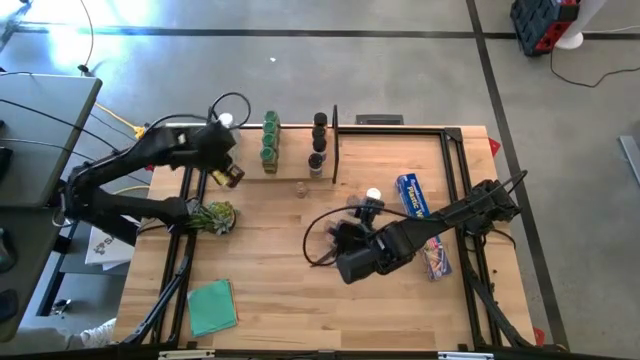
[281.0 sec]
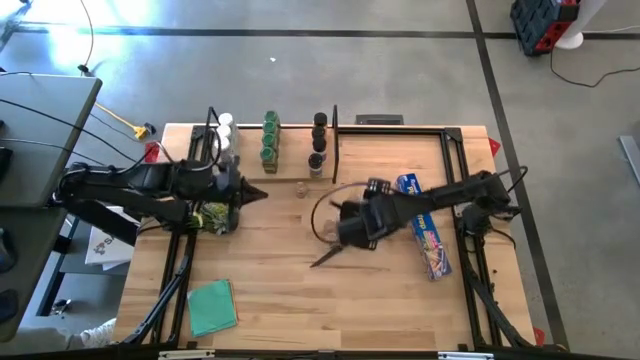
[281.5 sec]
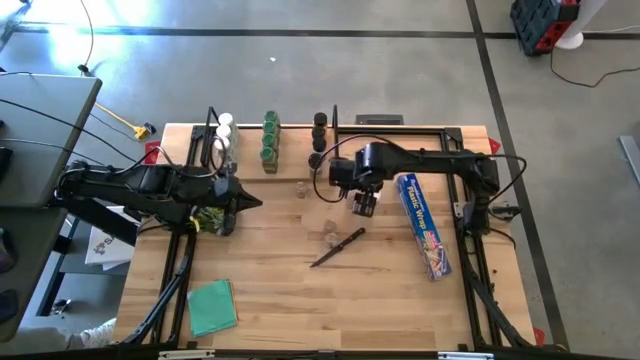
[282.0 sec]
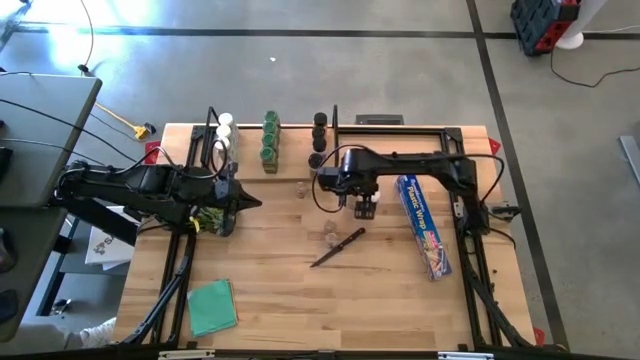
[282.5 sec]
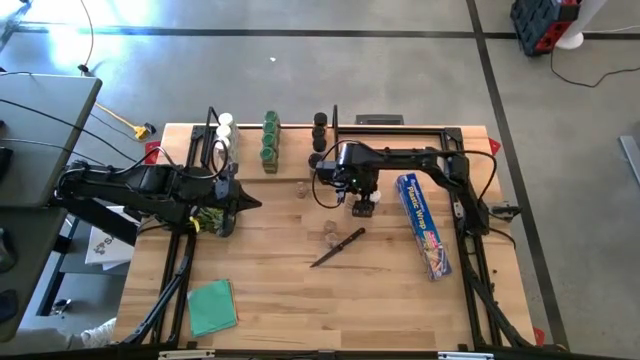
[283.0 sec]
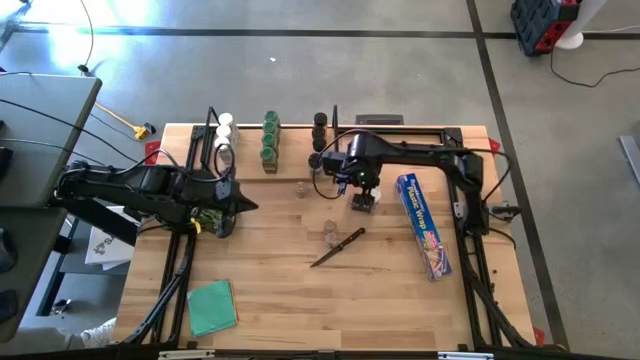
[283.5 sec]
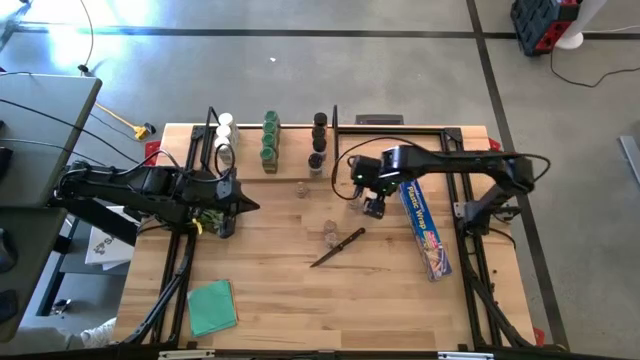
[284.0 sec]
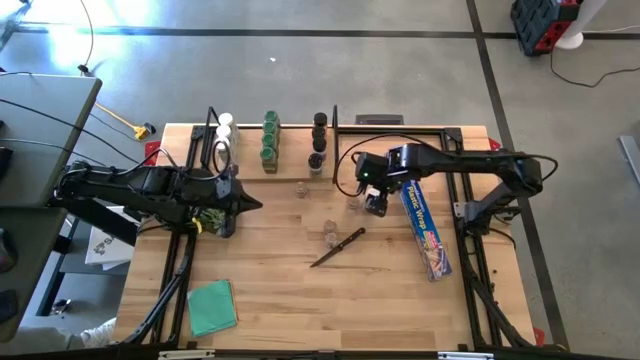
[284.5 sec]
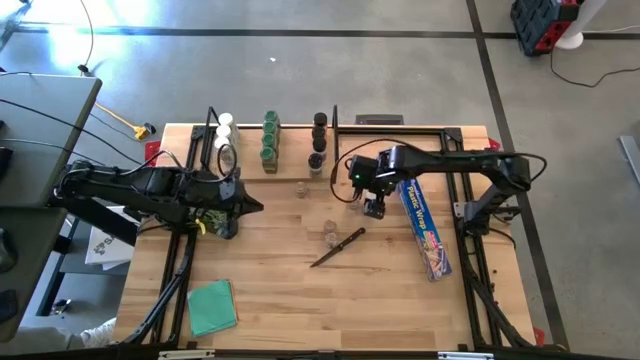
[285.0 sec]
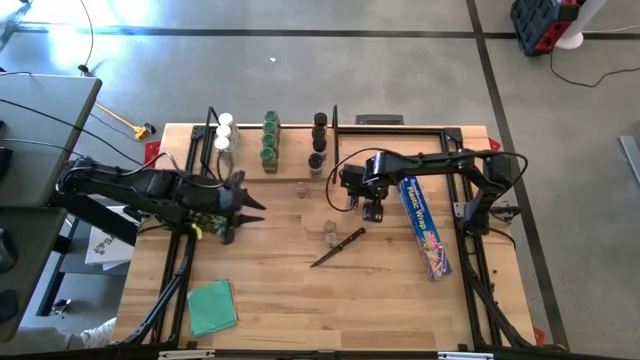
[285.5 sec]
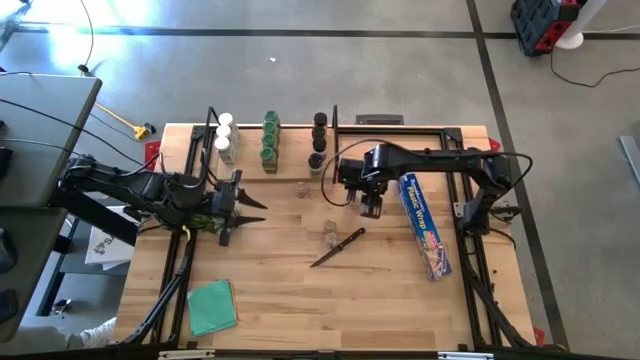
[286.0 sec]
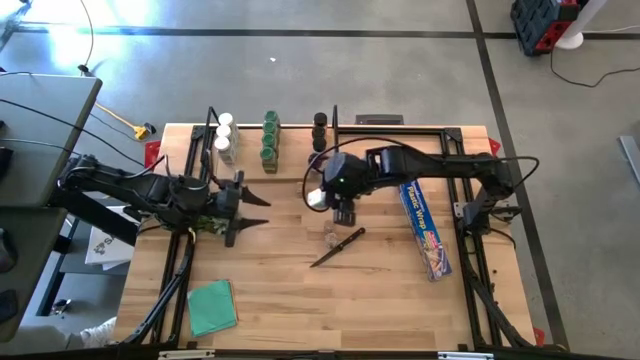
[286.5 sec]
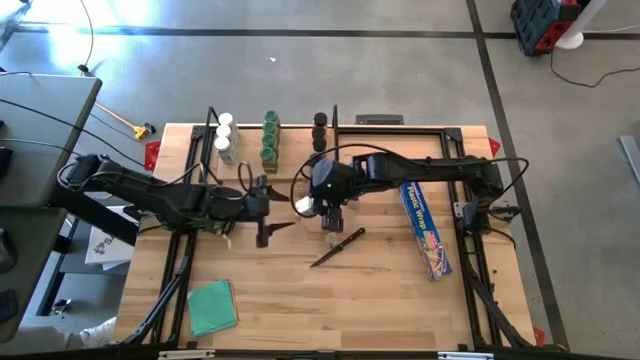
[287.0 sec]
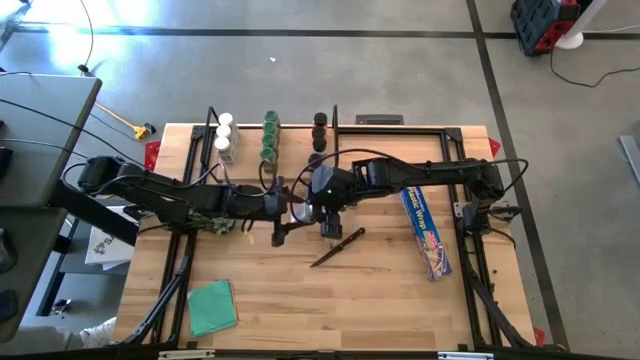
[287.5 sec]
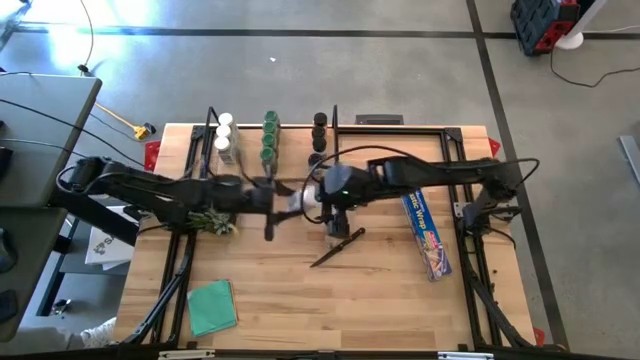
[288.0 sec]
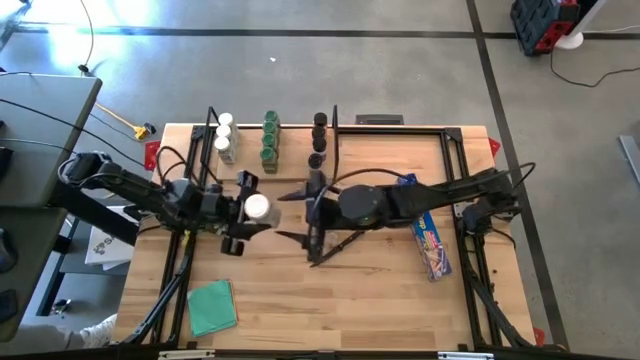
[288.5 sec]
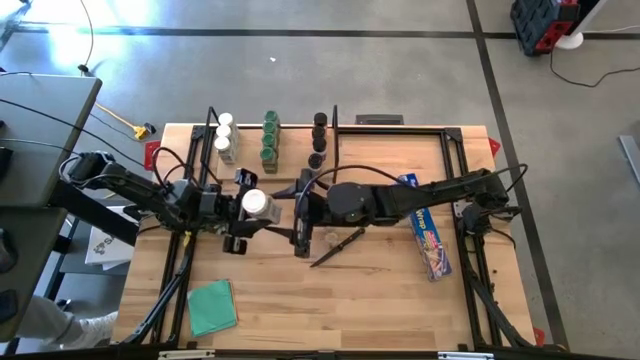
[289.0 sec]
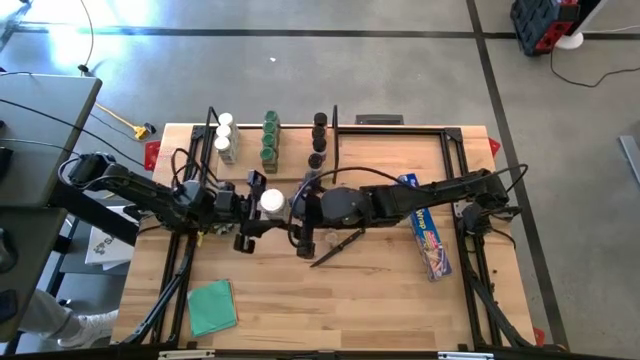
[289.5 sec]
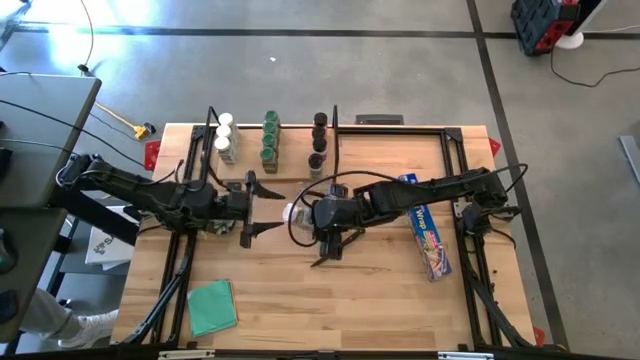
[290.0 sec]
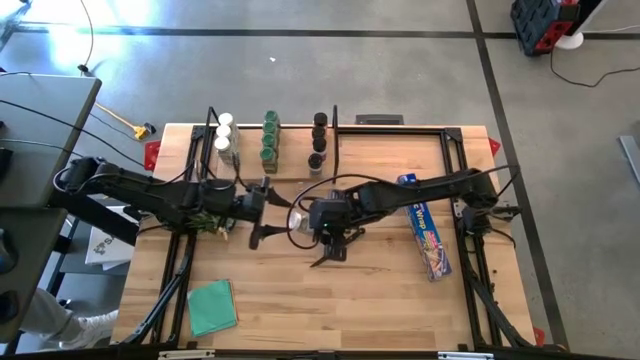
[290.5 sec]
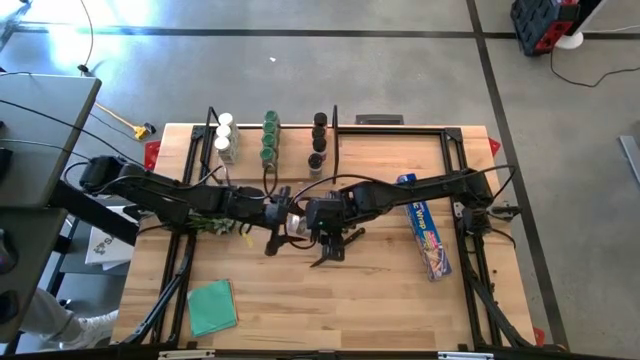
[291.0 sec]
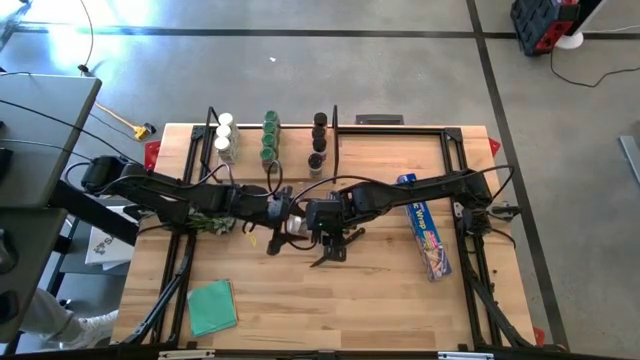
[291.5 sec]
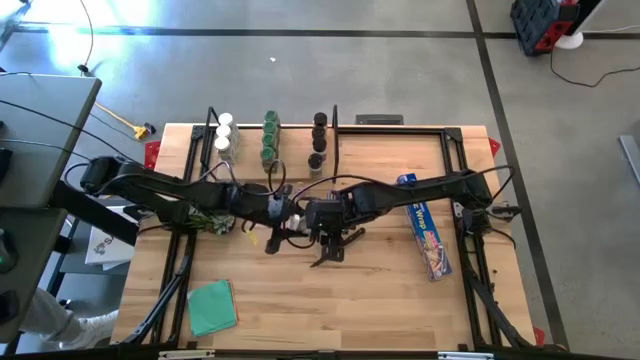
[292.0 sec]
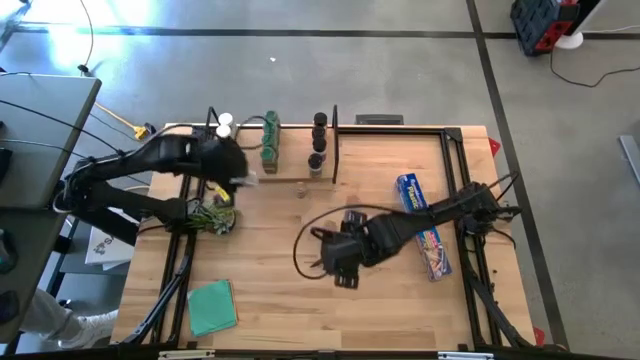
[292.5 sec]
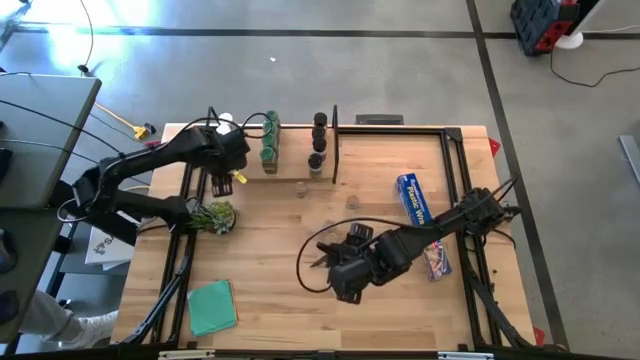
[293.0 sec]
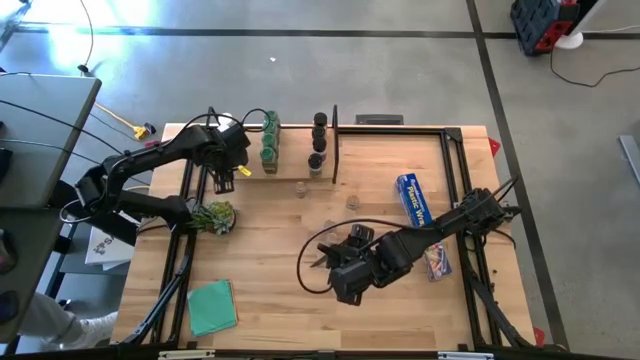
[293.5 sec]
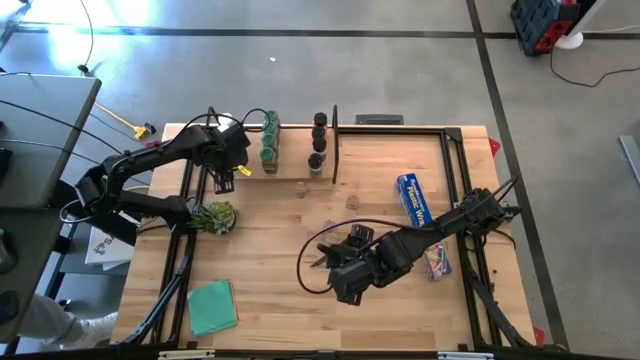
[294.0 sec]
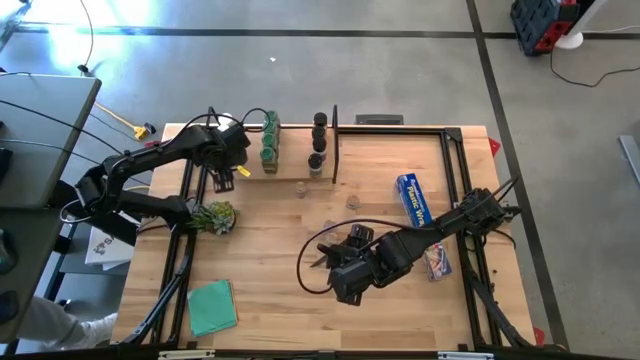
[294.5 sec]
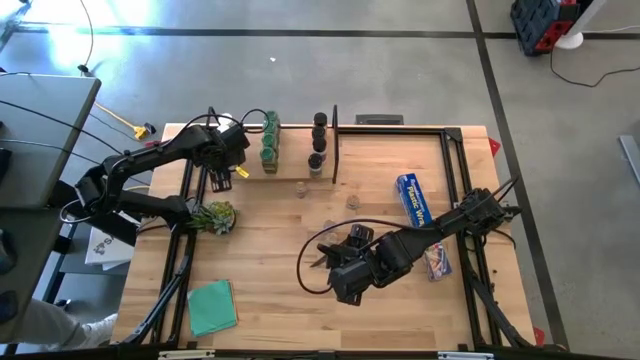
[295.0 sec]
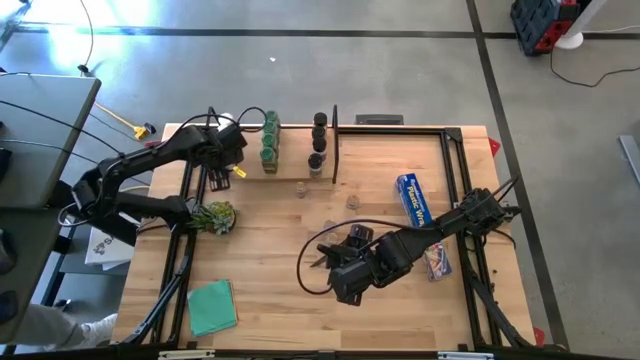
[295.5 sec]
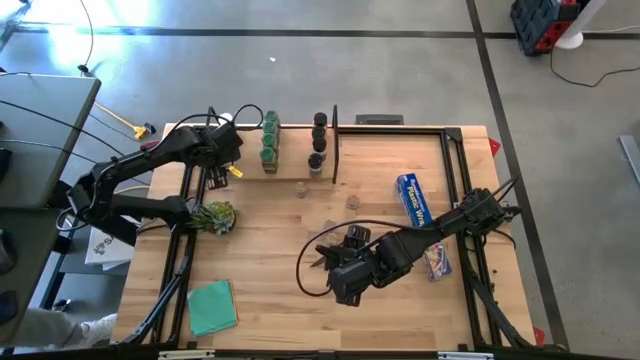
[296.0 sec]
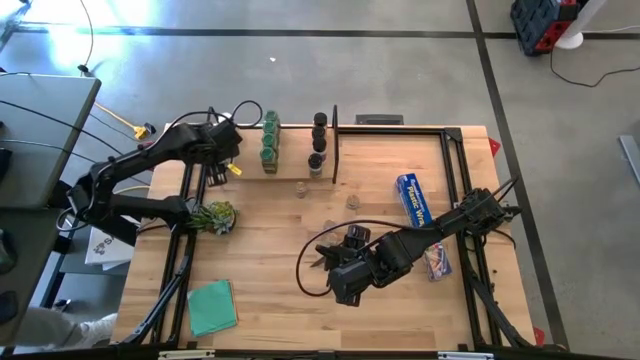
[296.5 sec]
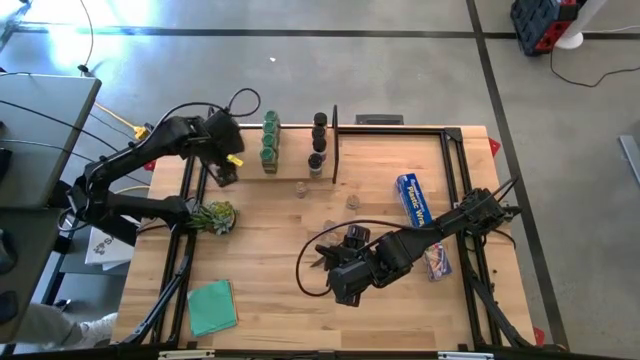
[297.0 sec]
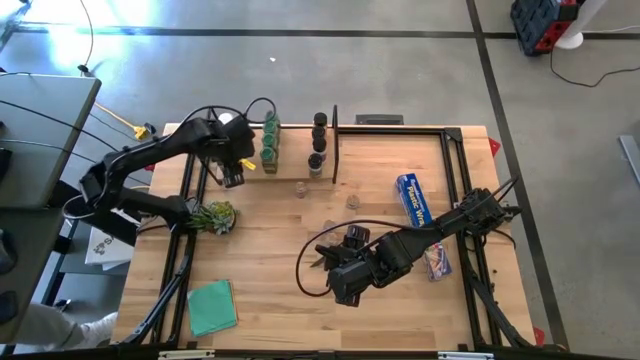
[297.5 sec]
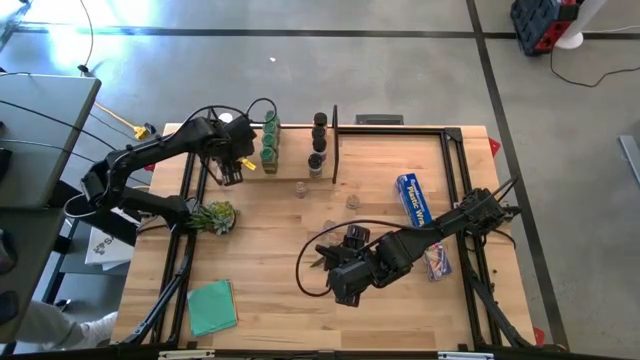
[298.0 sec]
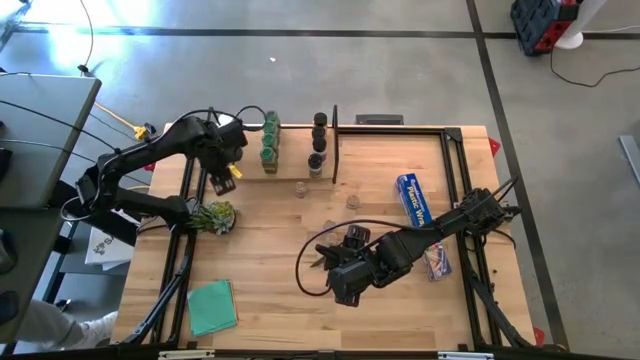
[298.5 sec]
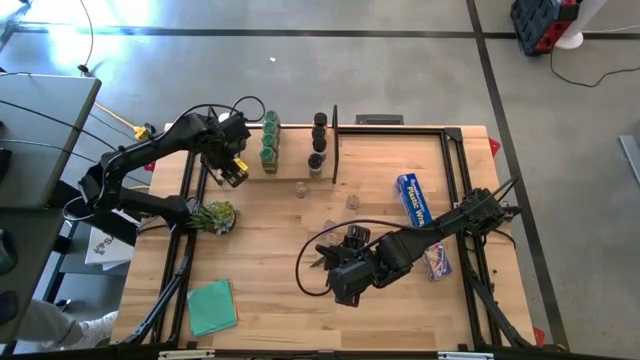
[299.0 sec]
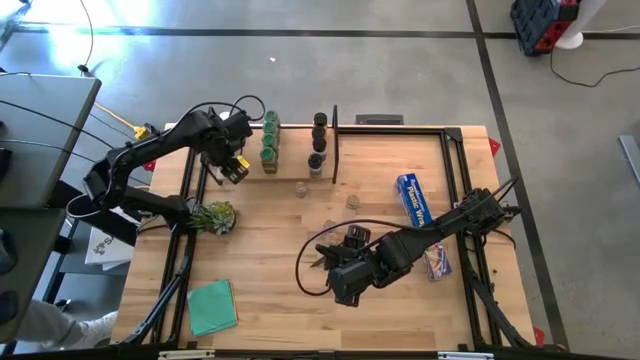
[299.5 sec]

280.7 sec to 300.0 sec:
Task: Shelf spices
Put the white lid seasoning bottle on the shelf
